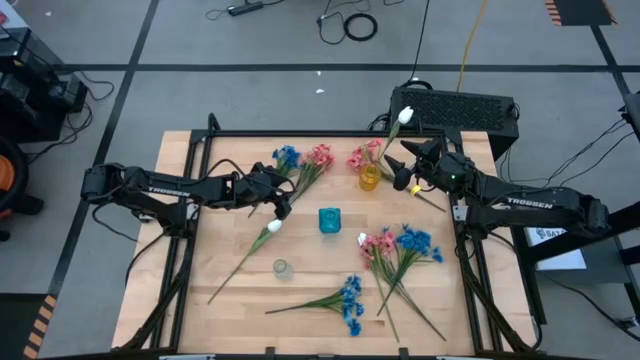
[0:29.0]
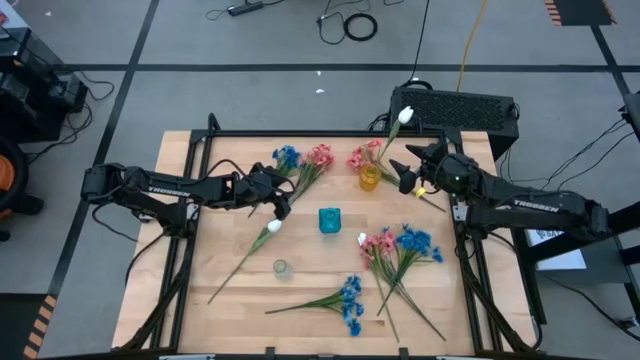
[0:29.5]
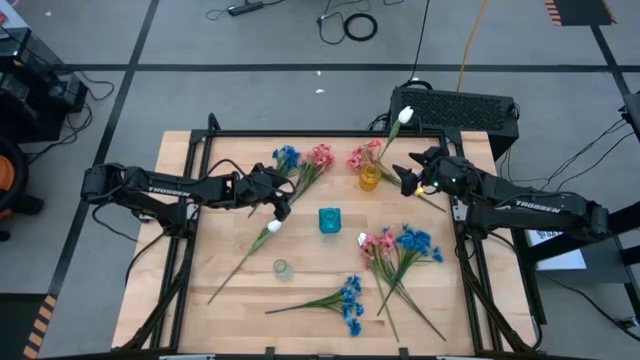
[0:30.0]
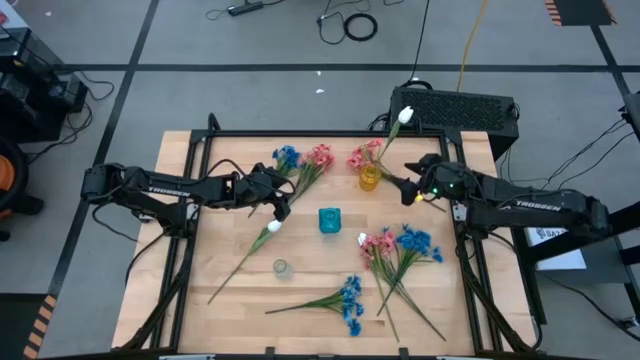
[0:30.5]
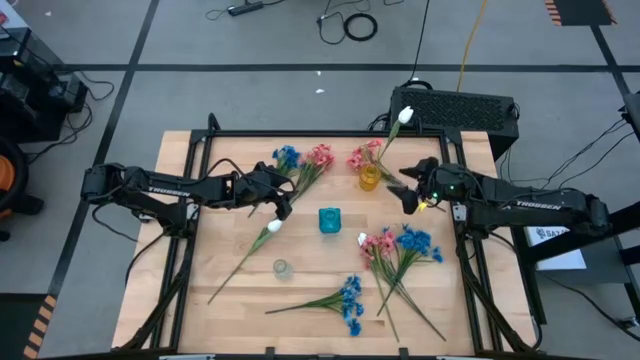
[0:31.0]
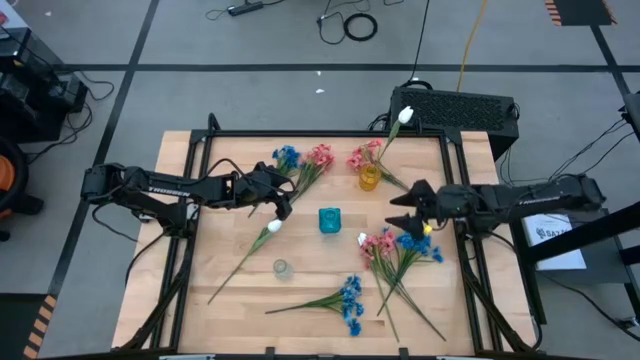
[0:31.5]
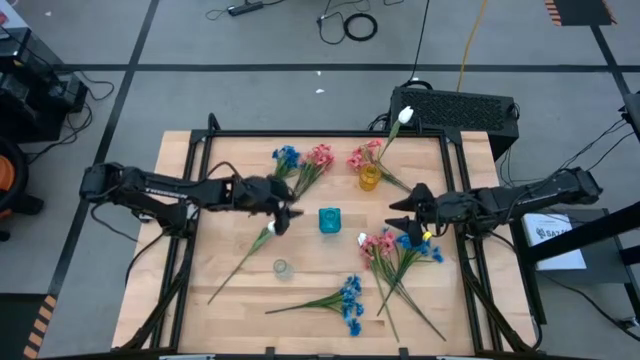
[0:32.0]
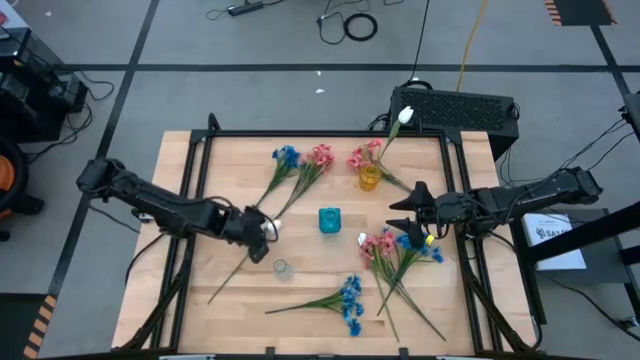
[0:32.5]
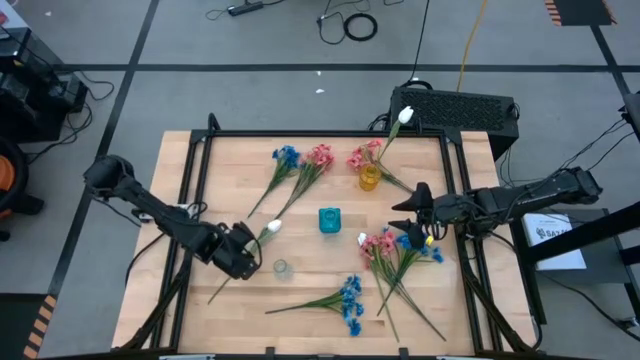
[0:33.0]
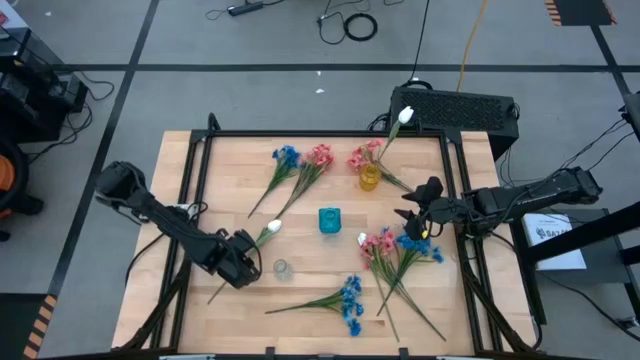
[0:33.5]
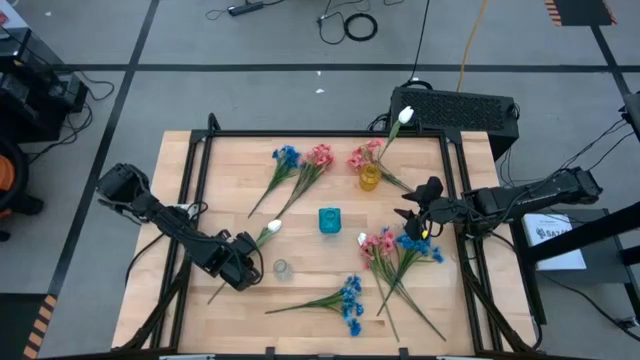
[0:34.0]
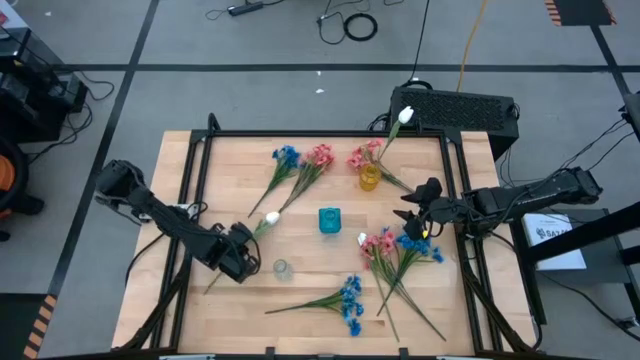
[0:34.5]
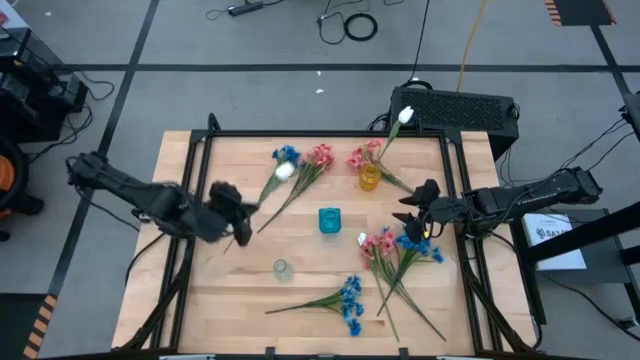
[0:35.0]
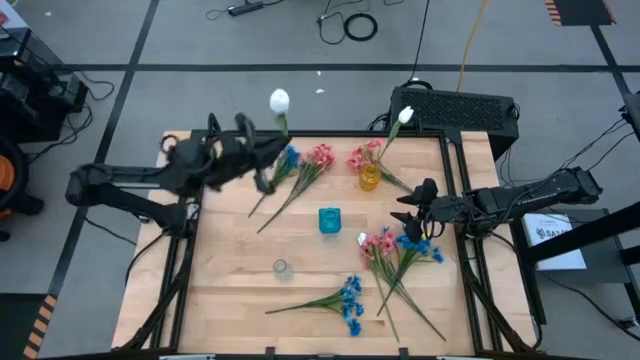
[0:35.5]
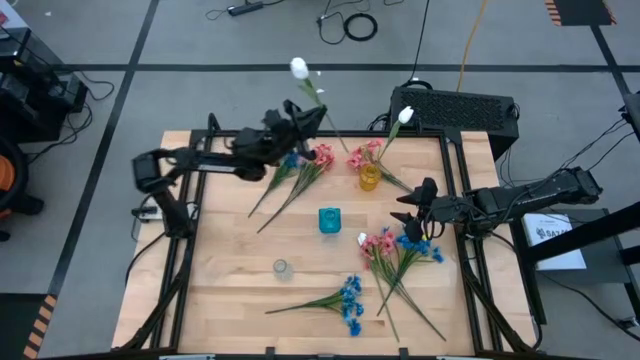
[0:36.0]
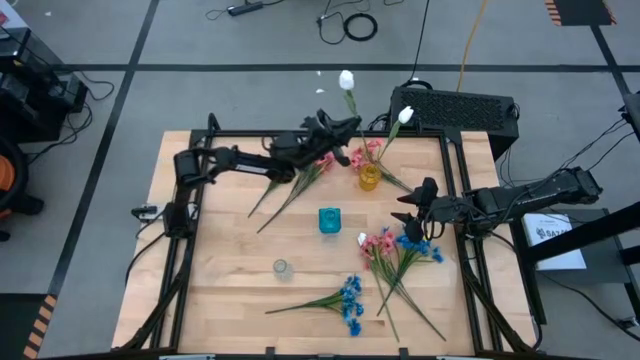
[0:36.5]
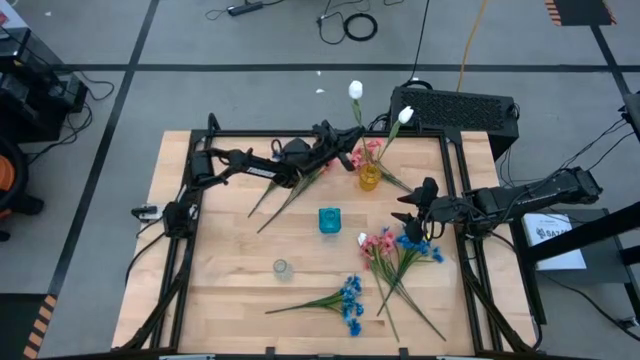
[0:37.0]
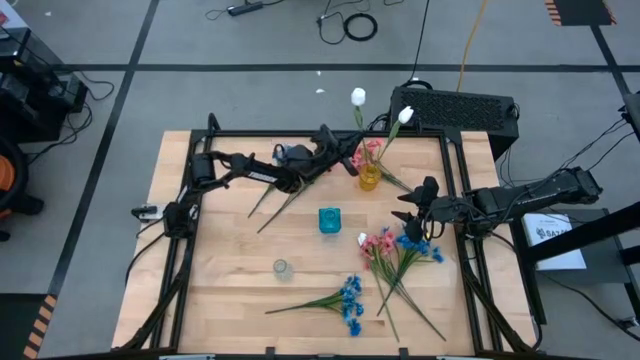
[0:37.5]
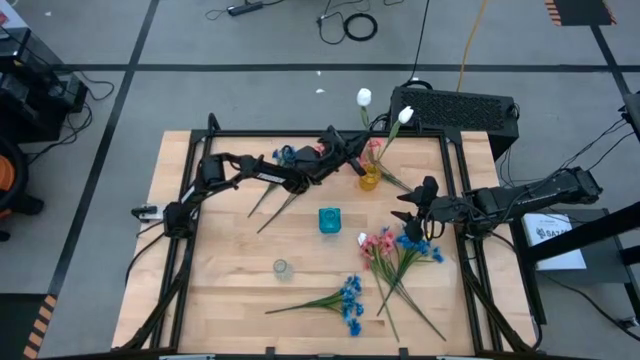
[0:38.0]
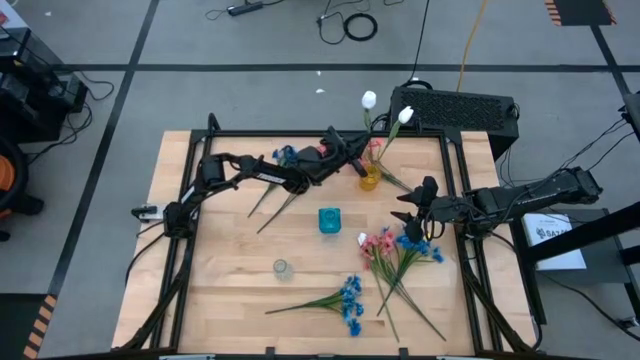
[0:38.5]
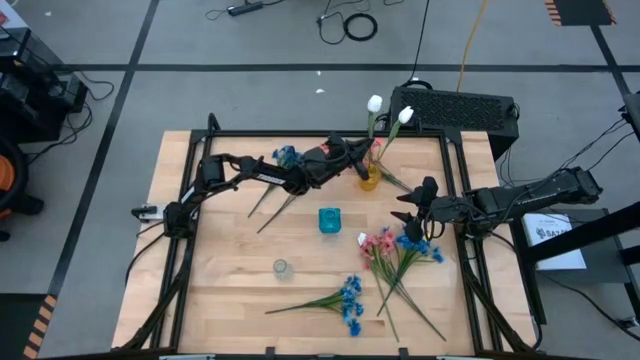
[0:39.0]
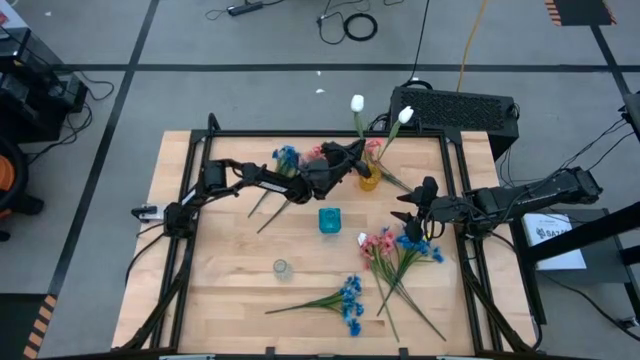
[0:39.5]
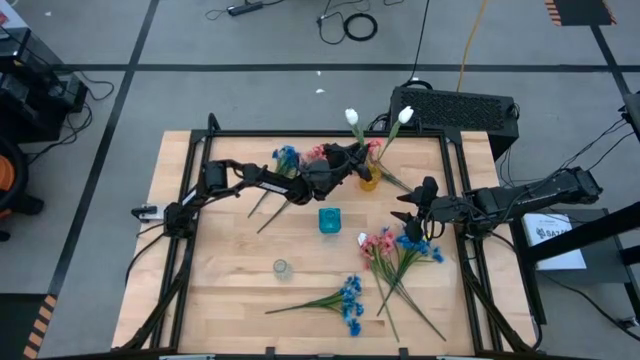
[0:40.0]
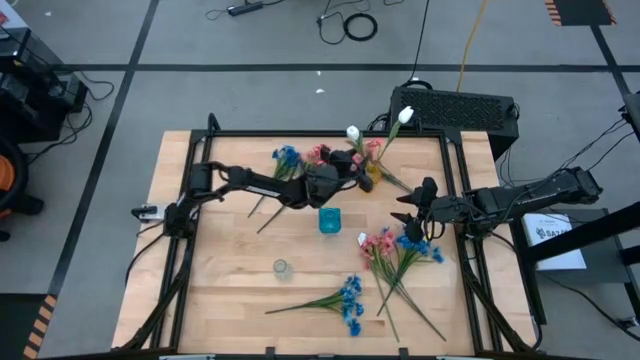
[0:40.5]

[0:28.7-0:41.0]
Task: Sort flowers into vase by color
Put the left white tulip into the yellow vase

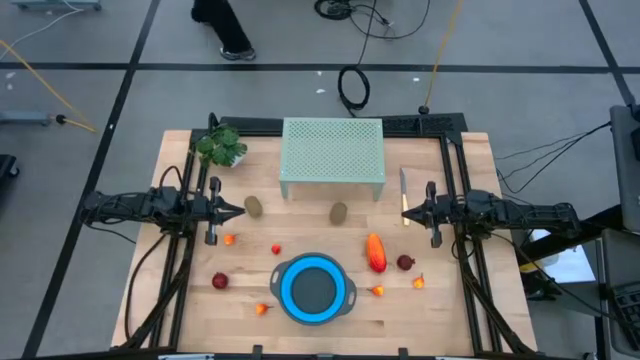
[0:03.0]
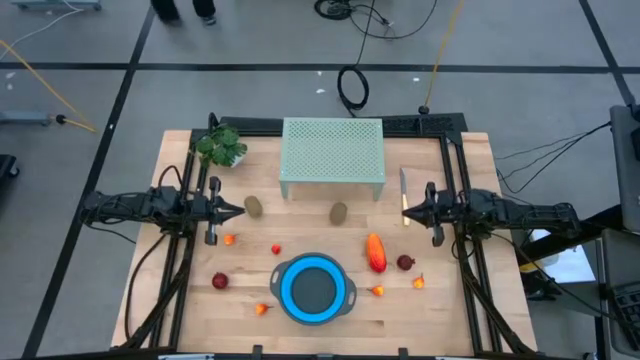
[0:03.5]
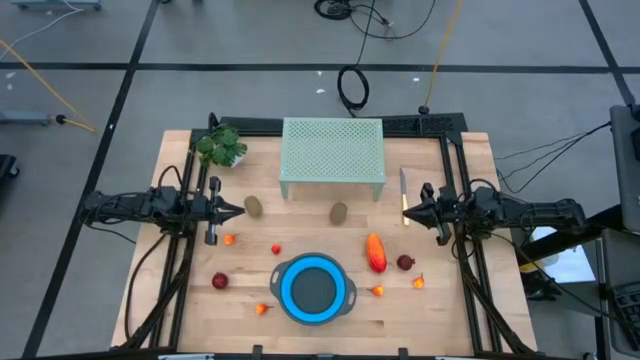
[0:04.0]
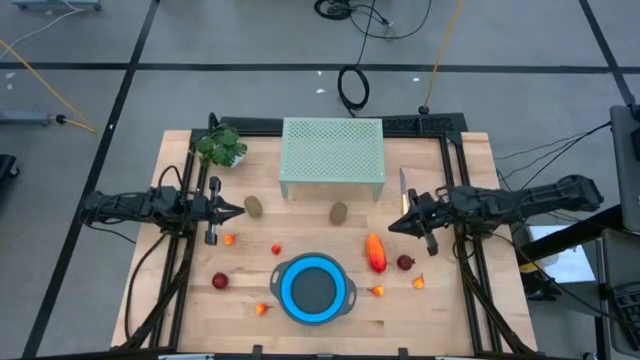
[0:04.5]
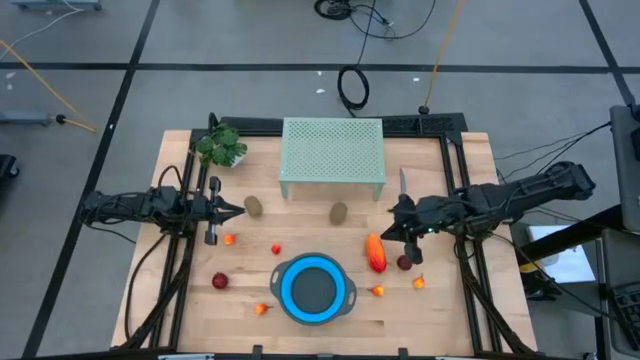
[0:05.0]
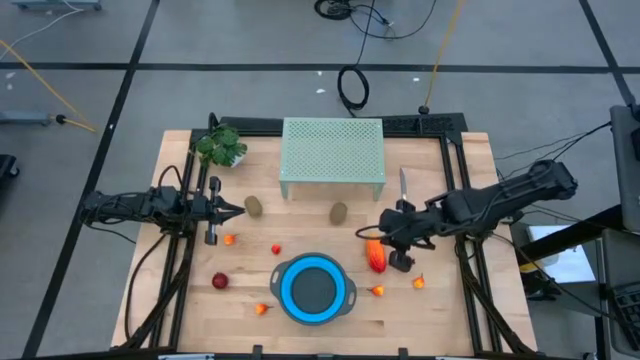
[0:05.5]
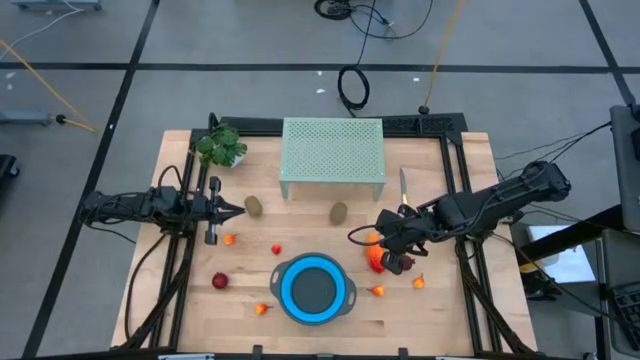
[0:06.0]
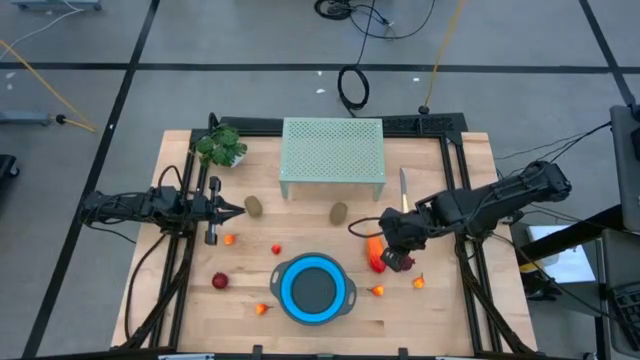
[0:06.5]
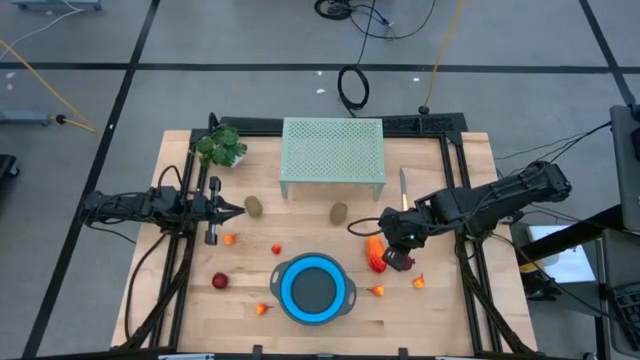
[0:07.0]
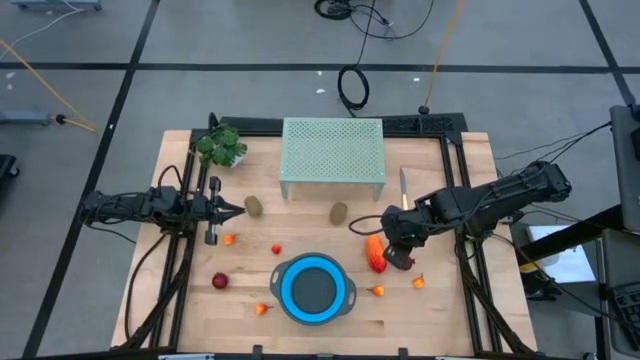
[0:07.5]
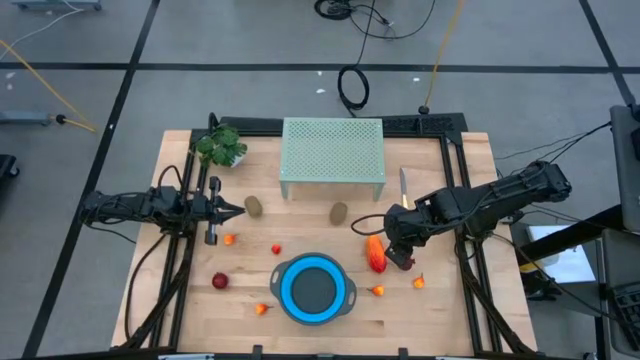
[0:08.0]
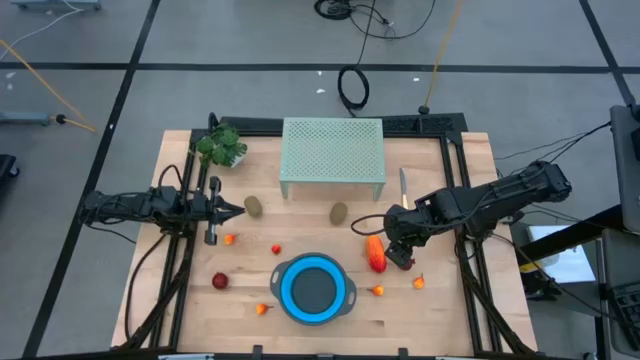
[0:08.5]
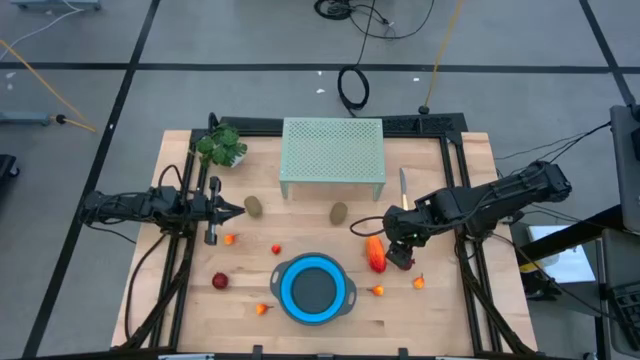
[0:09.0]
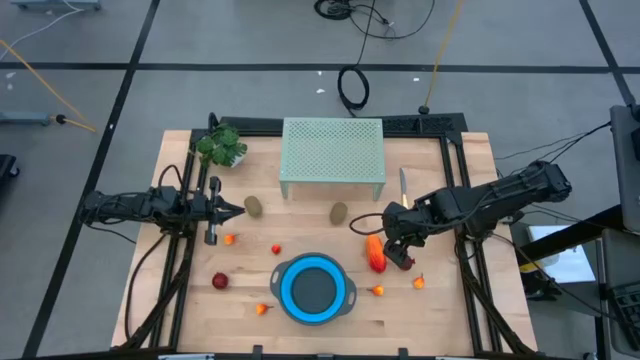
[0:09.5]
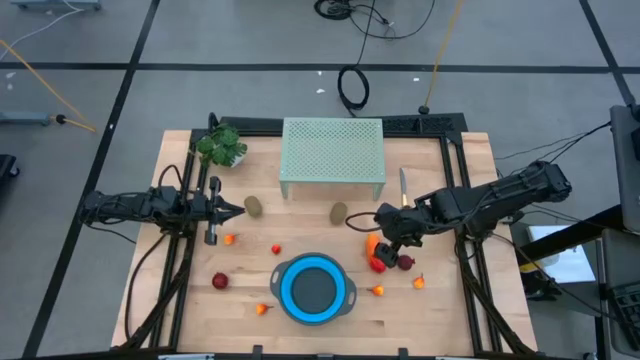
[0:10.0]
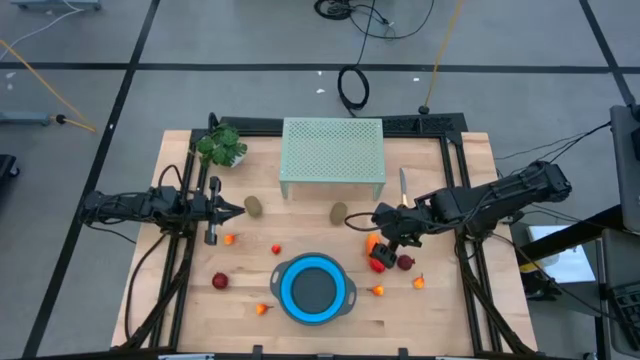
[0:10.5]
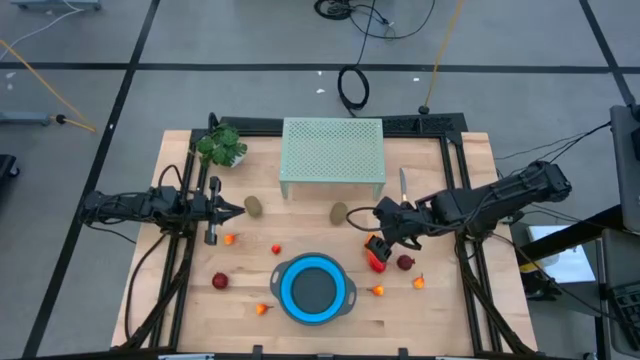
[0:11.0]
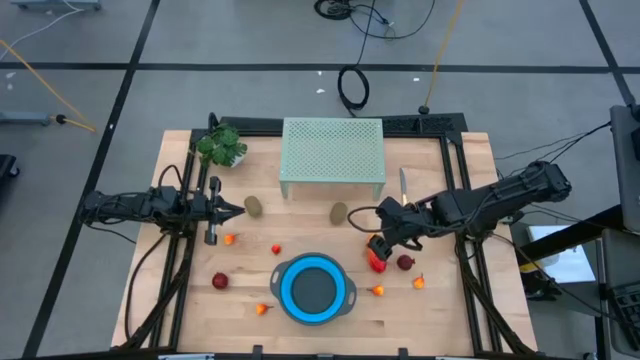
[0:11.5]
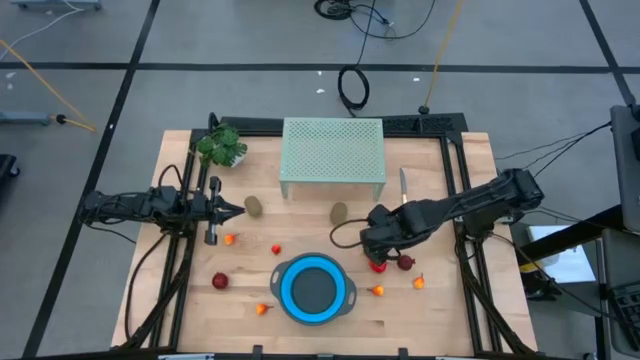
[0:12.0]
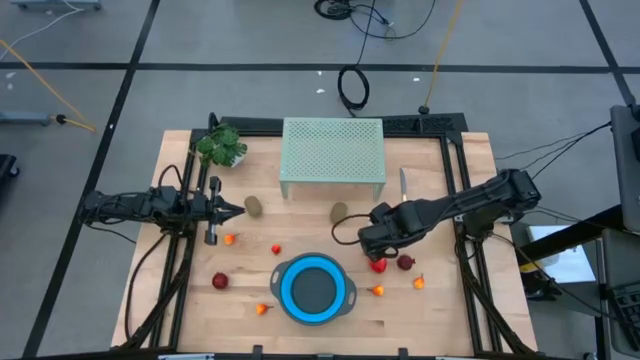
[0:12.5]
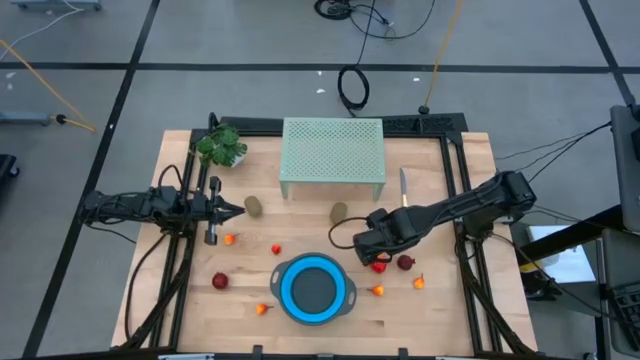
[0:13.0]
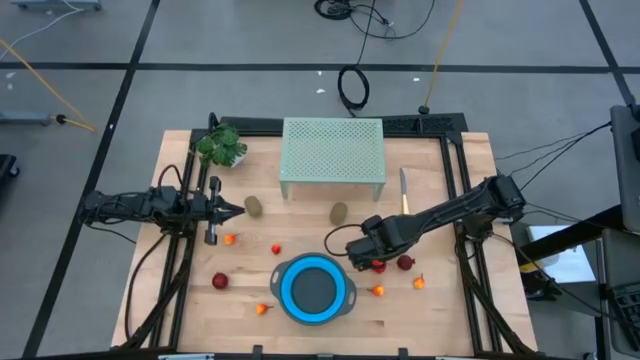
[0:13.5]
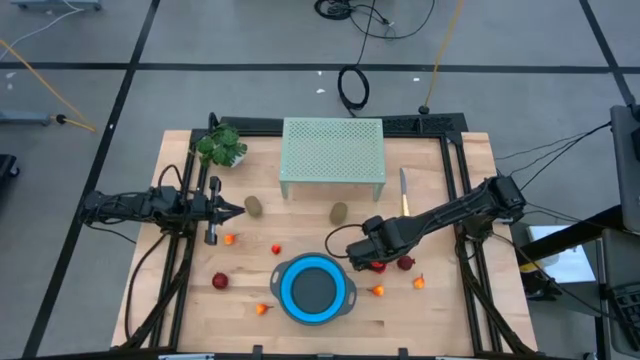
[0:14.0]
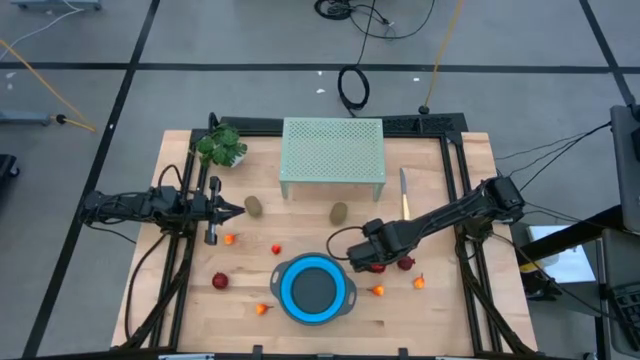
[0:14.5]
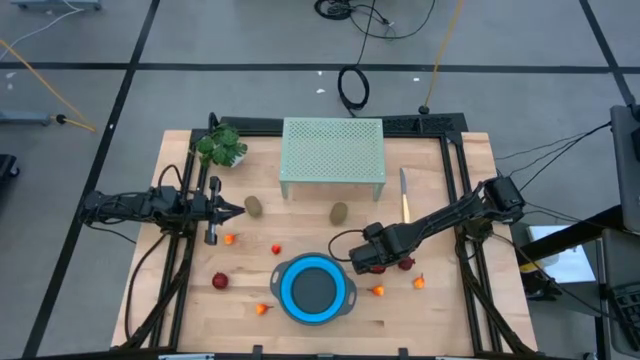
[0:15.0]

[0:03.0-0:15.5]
Task: Pick & Place Fruit
Put the colander on the shelf
